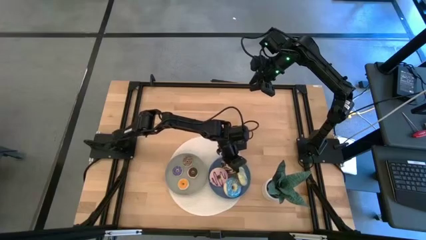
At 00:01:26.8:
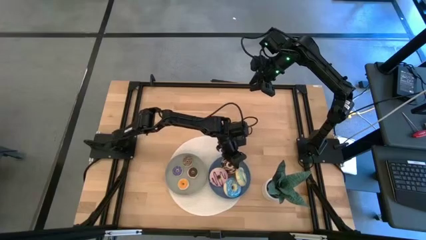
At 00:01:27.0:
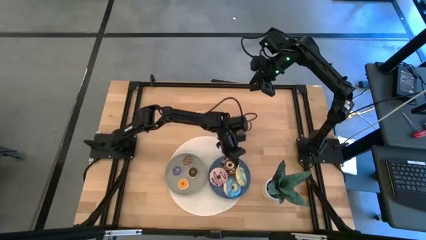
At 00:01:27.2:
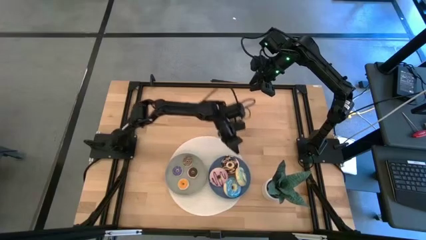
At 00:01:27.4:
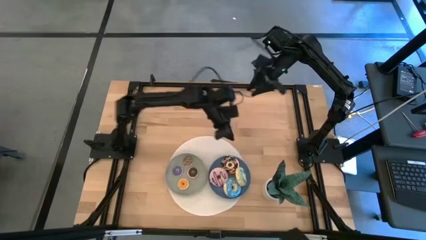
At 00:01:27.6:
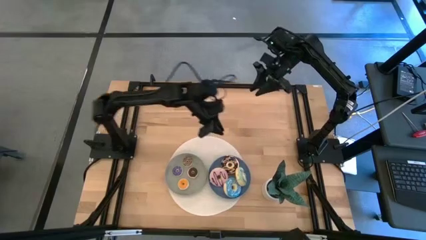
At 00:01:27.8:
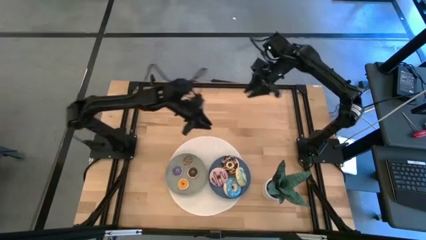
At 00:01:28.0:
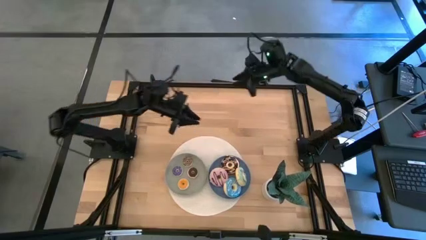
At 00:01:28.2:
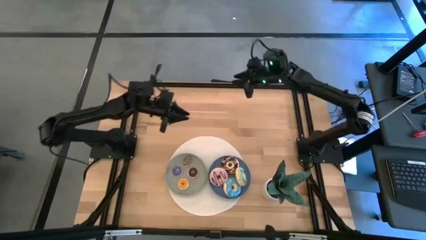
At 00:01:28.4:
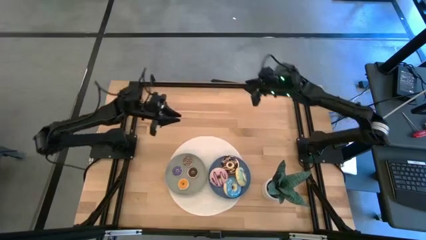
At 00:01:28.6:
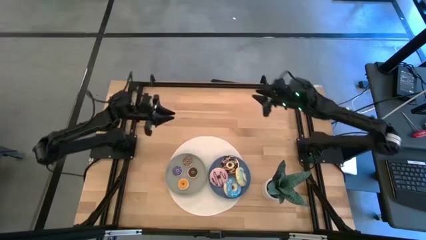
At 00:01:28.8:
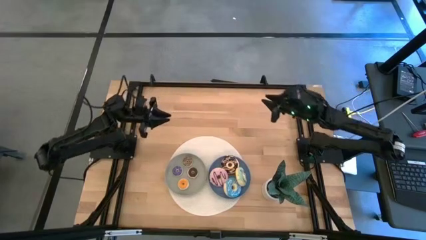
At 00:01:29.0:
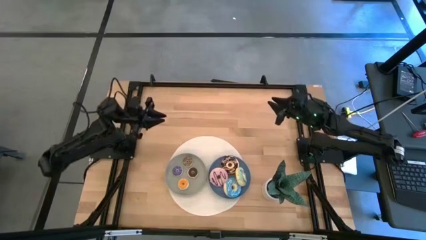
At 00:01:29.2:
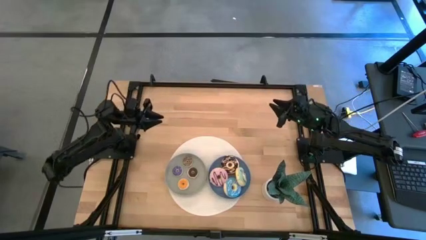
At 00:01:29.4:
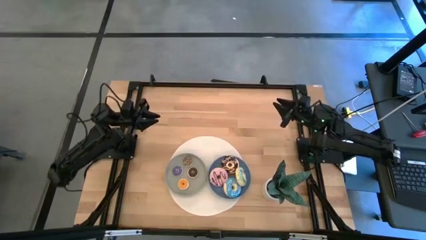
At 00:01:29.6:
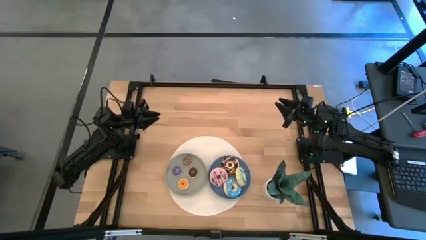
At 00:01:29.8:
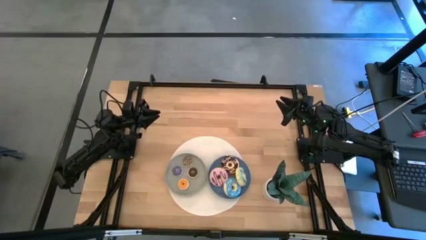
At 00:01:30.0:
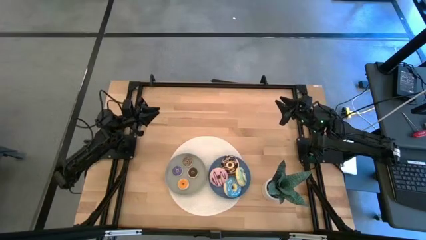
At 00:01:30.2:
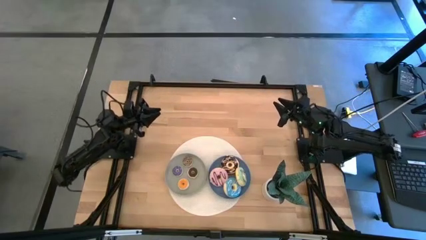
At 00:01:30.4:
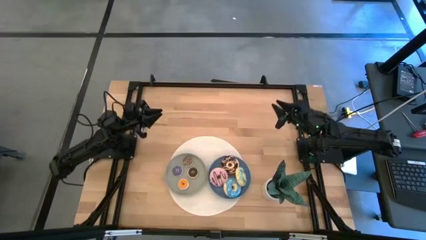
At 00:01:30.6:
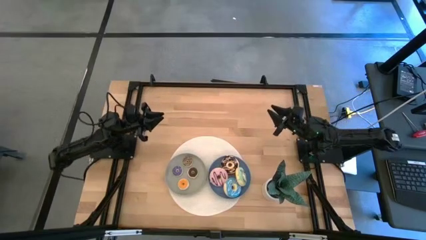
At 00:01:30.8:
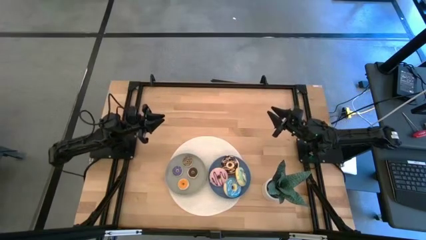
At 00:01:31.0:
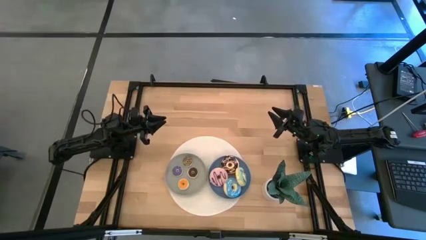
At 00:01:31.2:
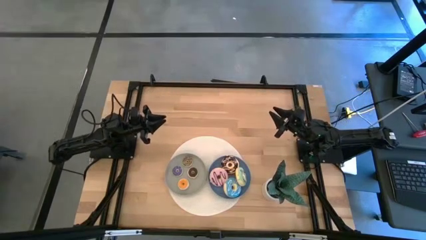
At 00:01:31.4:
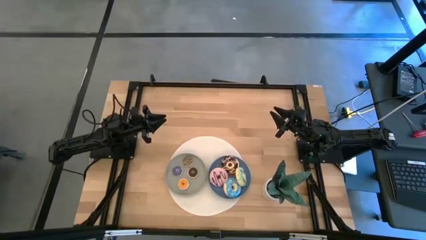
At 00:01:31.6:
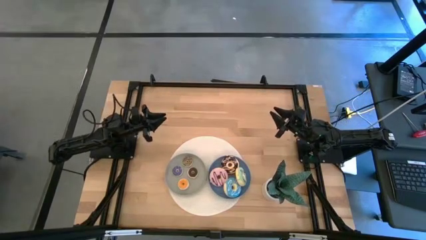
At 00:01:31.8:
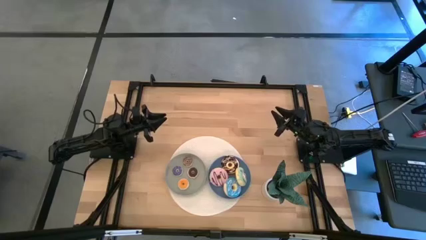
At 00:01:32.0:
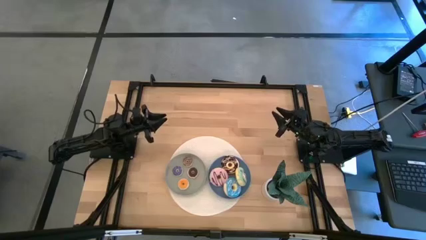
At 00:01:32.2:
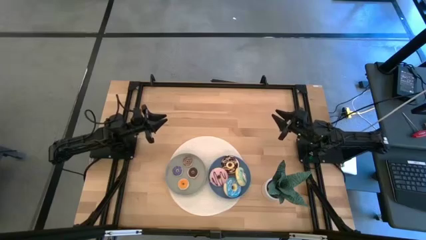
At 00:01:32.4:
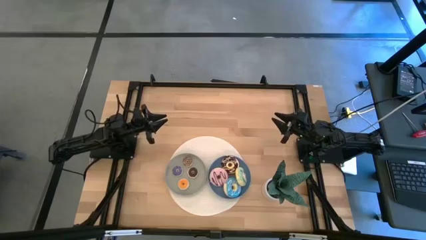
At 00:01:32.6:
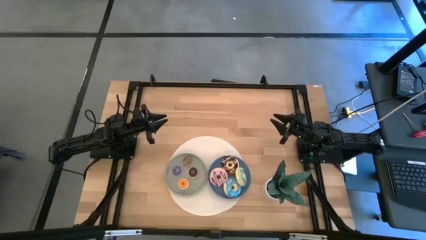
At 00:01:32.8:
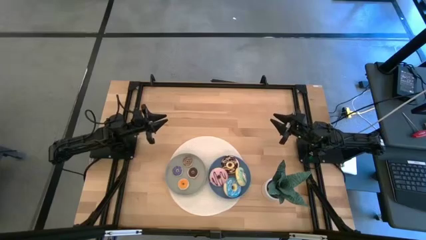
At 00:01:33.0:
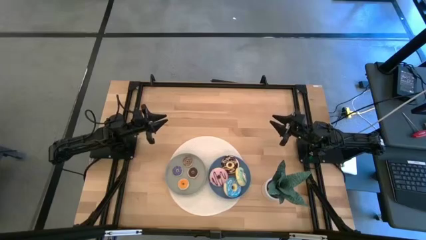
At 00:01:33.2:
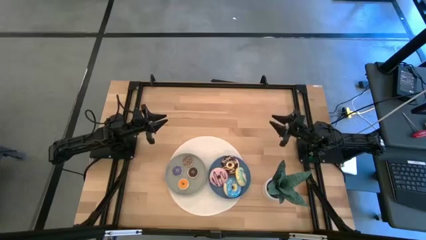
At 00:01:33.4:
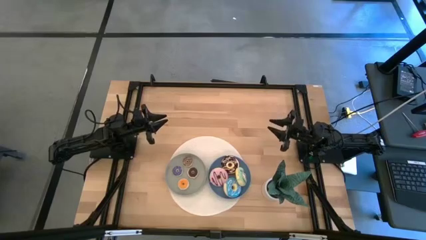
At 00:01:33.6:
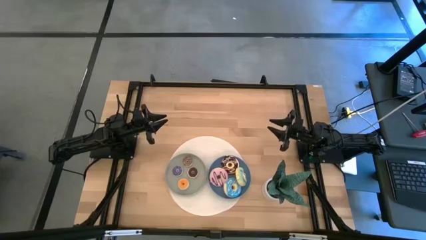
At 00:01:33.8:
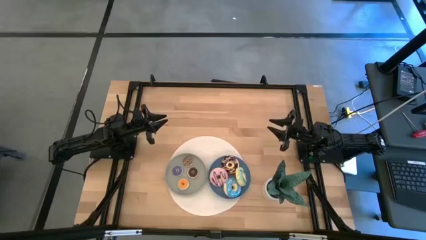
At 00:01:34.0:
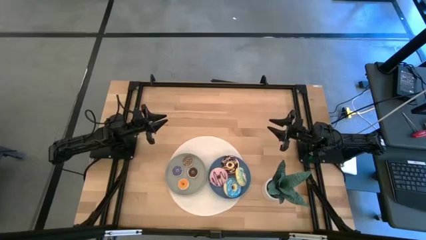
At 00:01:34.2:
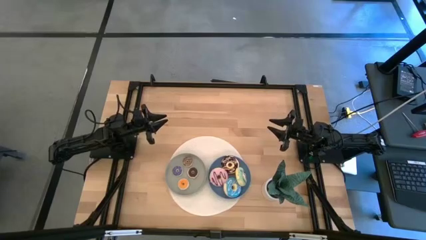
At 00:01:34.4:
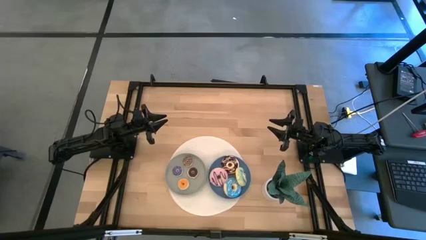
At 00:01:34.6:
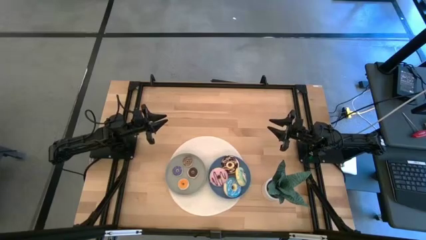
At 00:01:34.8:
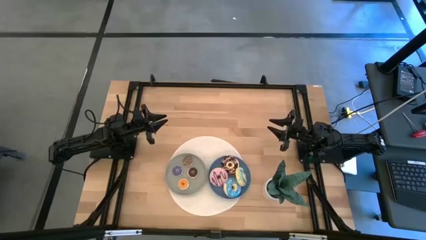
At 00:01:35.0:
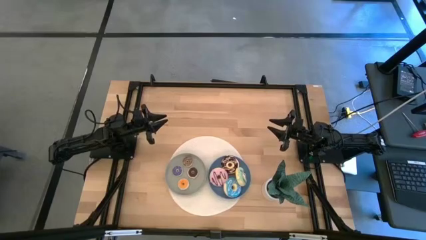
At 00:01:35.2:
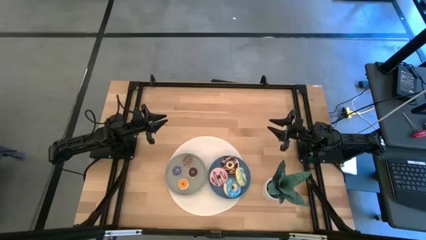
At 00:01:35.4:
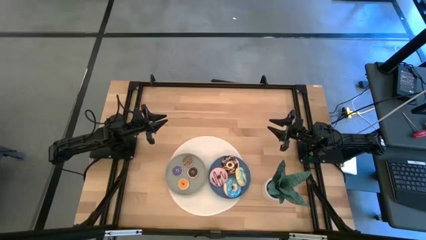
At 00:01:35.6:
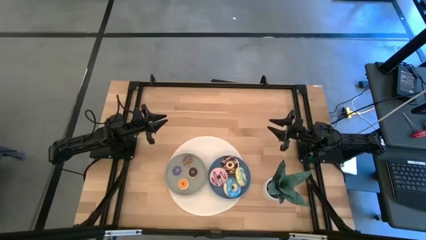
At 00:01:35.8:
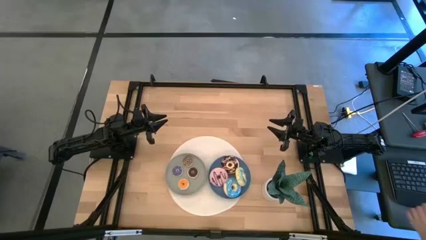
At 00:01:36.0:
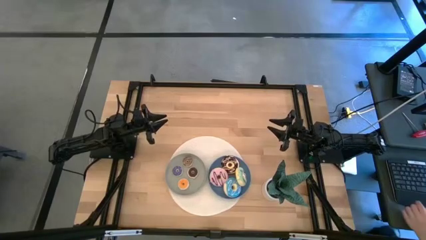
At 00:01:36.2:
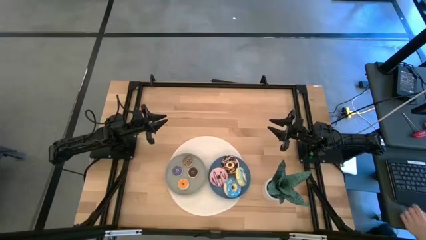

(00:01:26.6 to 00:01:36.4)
Task: Pick & Place donuts
Return to Home Position

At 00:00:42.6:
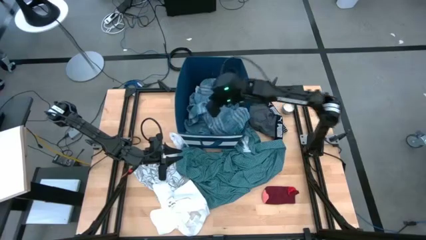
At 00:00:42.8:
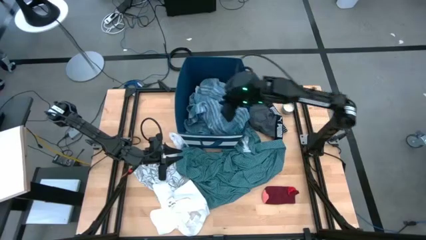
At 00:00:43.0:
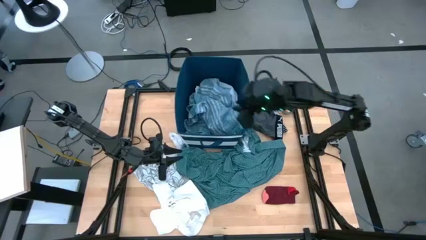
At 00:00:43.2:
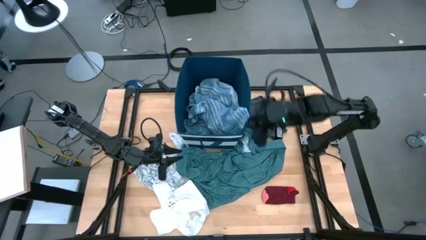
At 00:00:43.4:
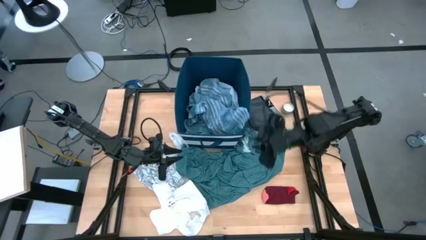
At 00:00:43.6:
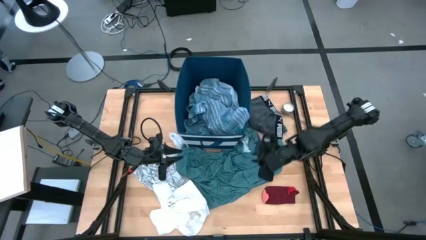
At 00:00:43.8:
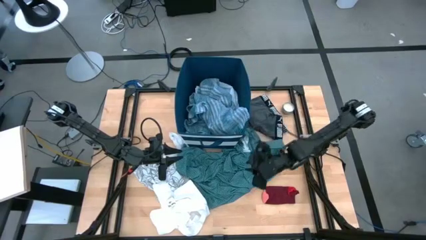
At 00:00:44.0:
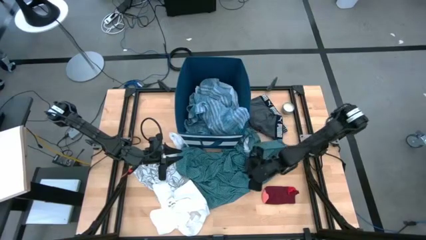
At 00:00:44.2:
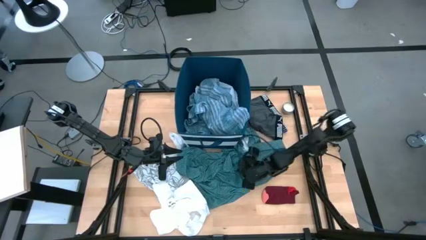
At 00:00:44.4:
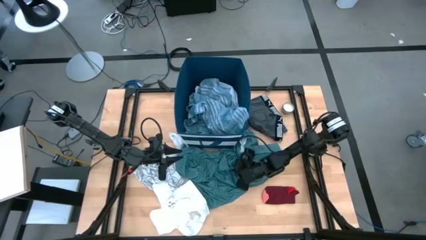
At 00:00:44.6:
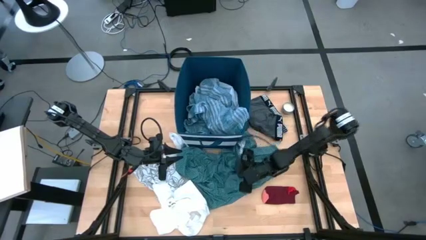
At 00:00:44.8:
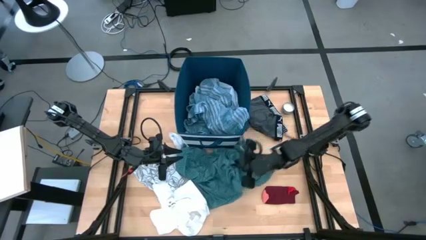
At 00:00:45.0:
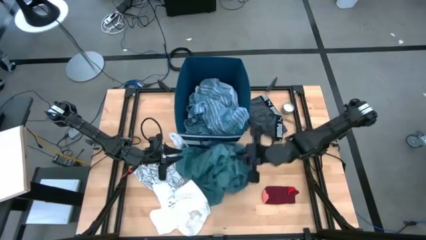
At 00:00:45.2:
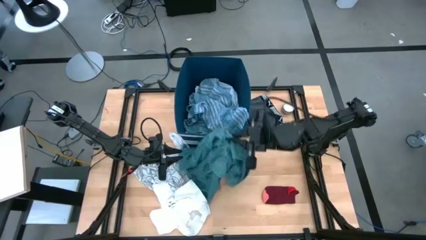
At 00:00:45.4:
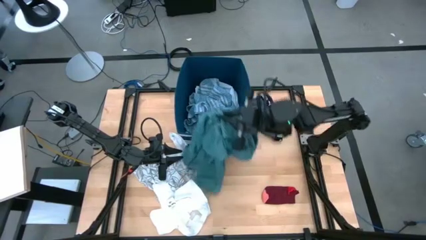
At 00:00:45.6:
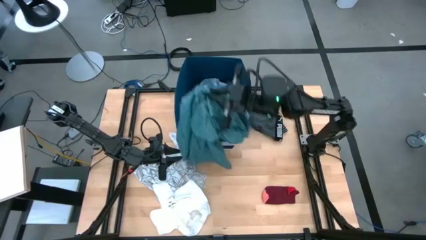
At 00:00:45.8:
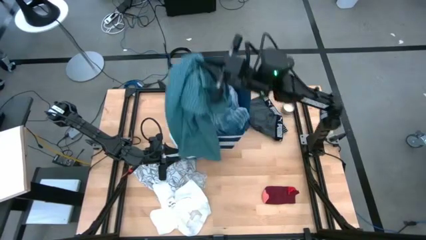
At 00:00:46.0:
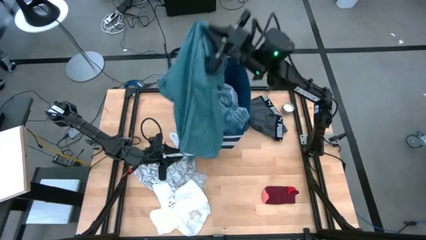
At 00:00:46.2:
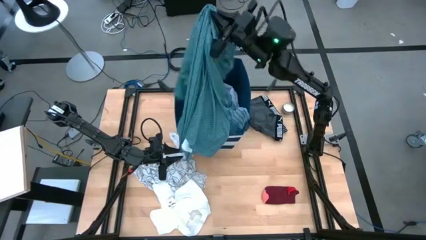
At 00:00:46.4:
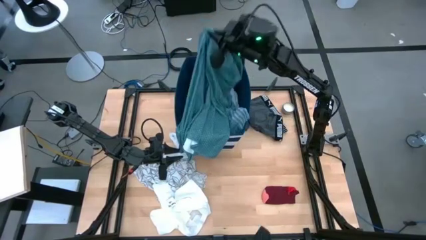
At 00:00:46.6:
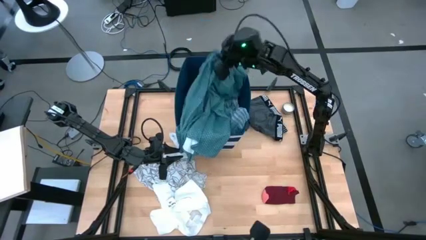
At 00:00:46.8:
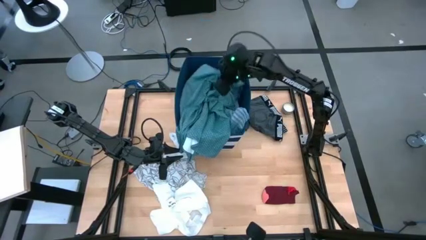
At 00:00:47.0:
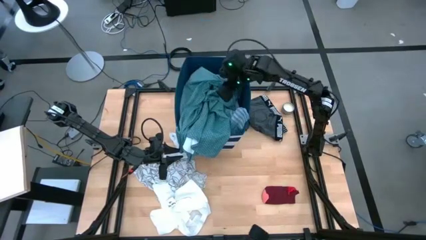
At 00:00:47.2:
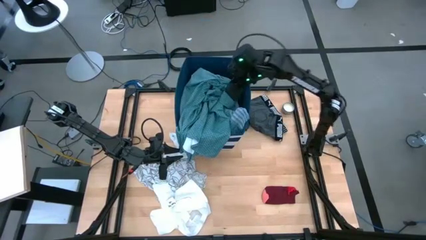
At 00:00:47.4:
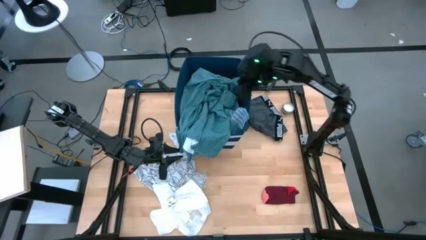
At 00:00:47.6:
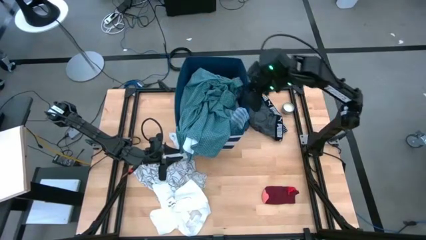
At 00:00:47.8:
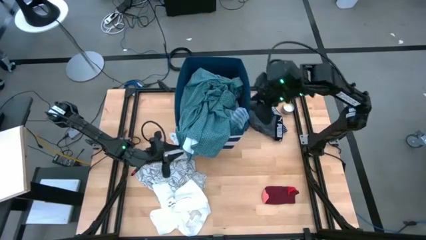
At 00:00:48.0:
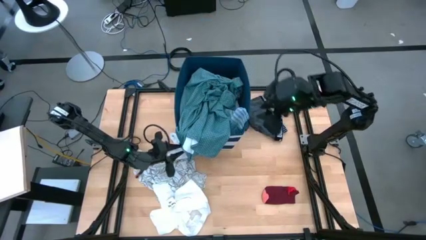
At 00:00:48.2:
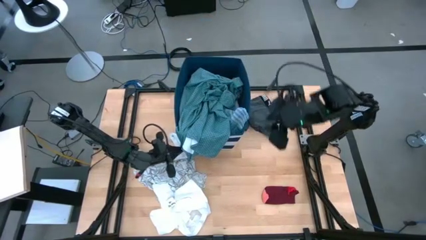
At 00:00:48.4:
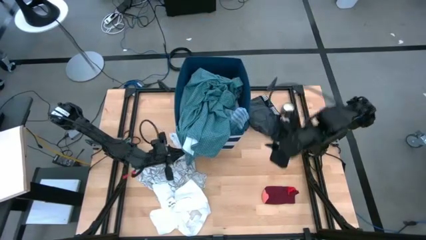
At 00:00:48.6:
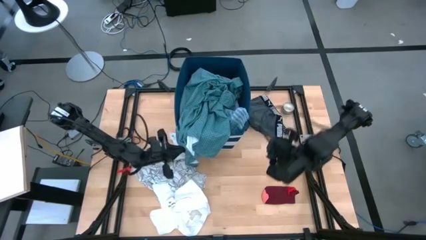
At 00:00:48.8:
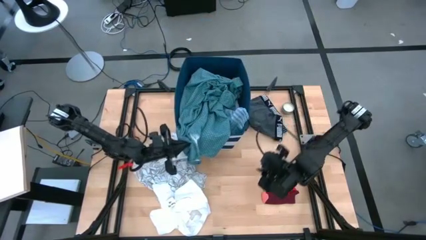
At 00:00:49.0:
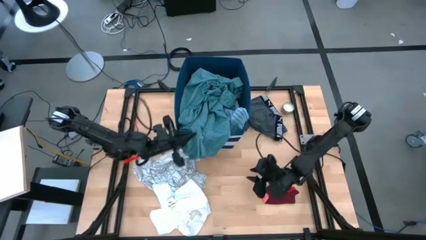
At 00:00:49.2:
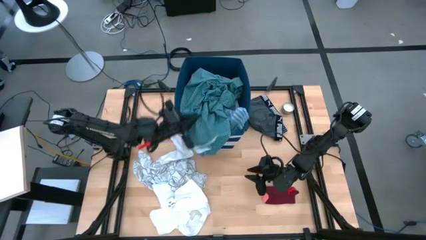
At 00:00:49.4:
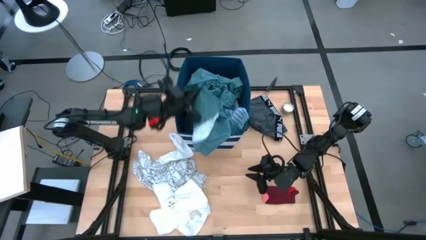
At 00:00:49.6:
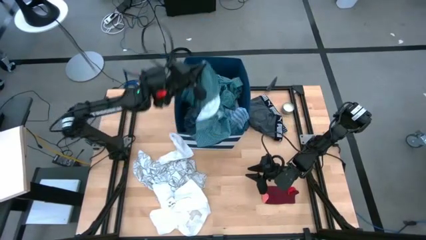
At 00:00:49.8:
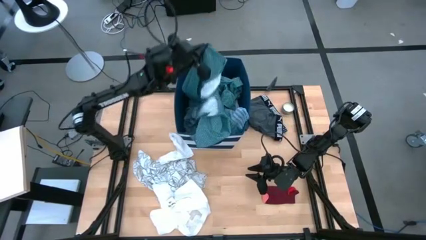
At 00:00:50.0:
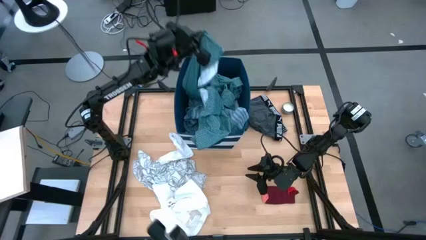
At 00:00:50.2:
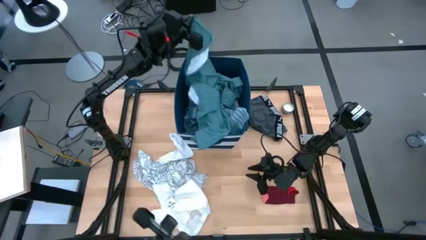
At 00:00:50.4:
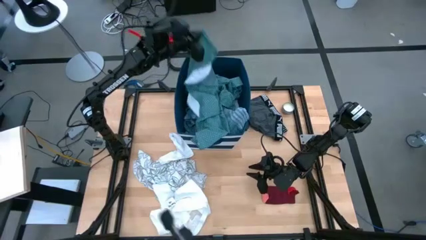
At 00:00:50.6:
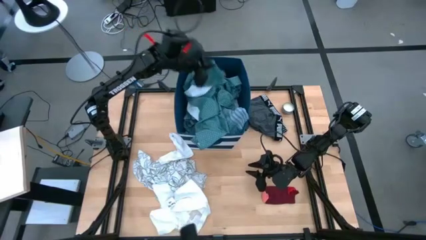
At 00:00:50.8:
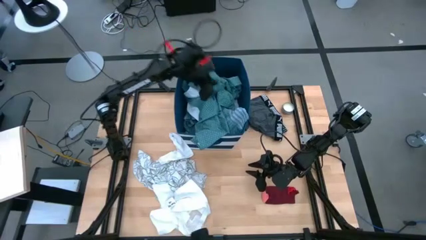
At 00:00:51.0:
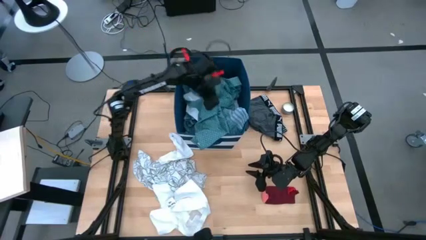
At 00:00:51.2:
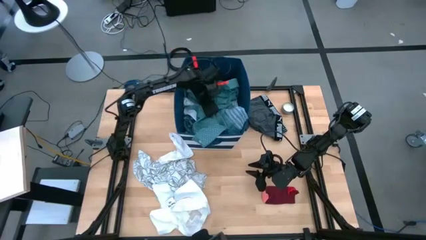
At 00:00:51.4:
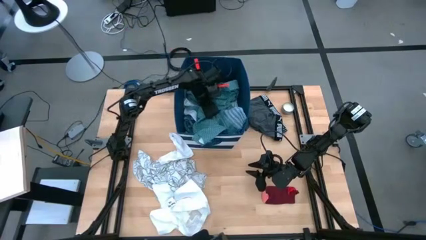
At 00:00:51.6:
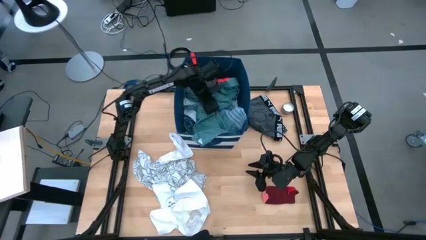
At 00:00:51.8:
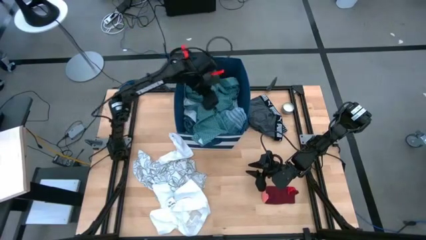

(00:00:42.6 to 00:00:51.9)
Task: Sort clothes
Put the green pattern shirt into the blue bin
